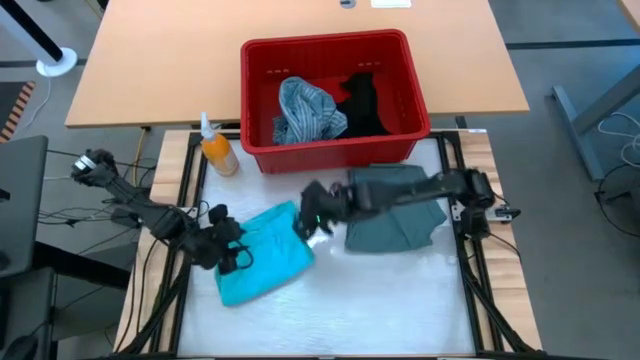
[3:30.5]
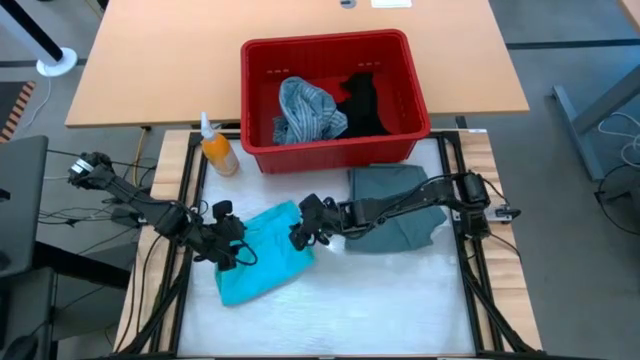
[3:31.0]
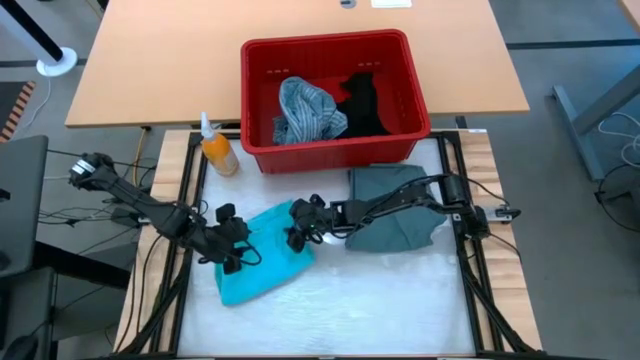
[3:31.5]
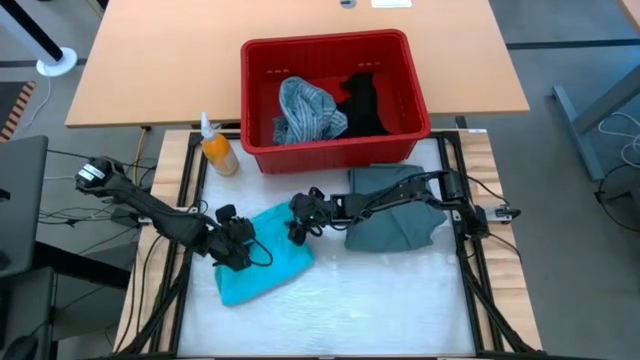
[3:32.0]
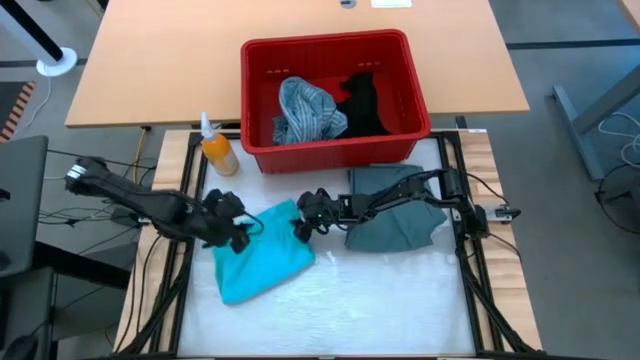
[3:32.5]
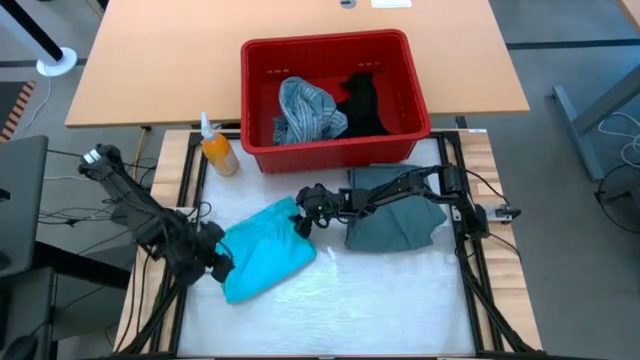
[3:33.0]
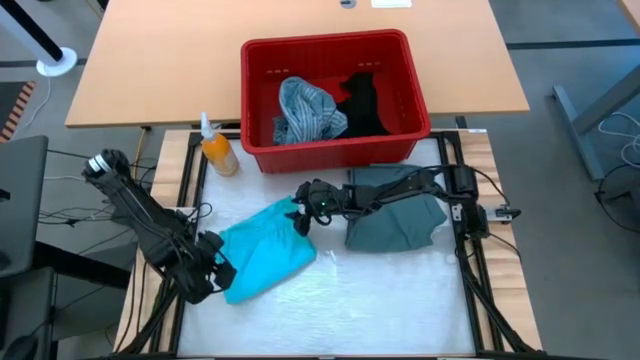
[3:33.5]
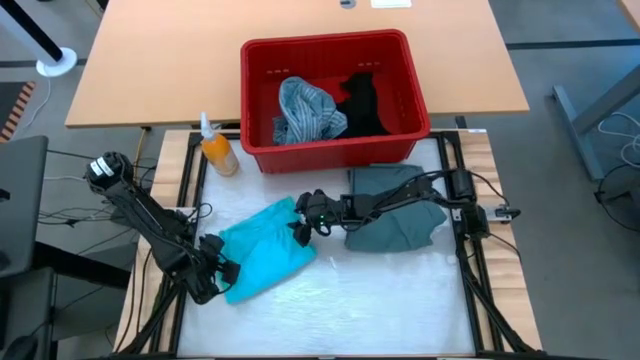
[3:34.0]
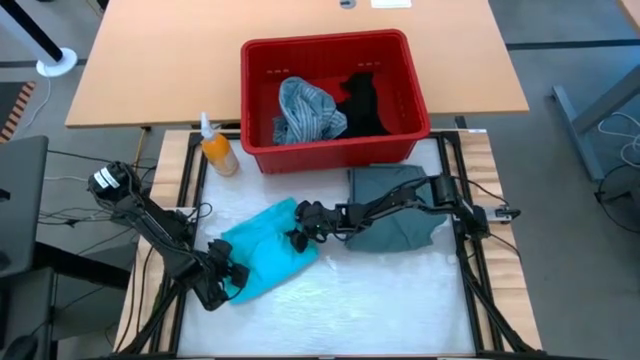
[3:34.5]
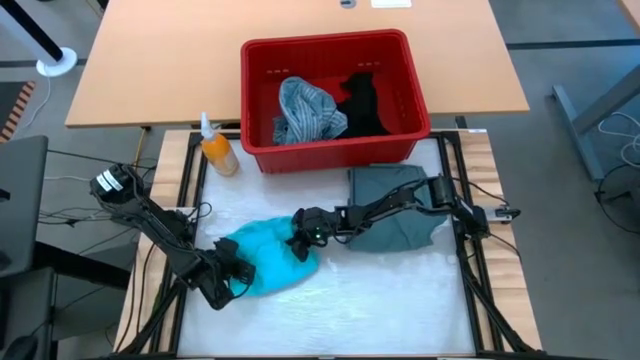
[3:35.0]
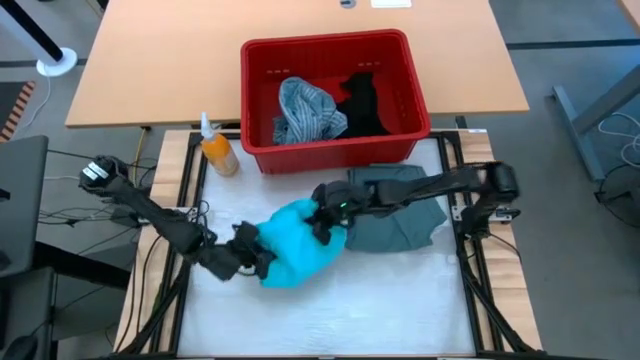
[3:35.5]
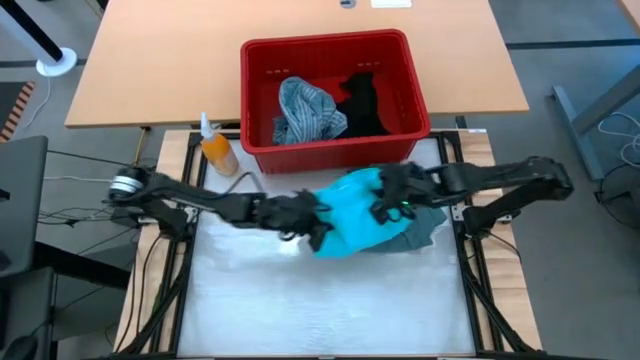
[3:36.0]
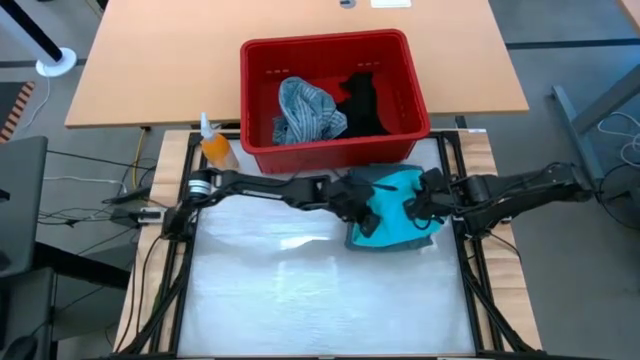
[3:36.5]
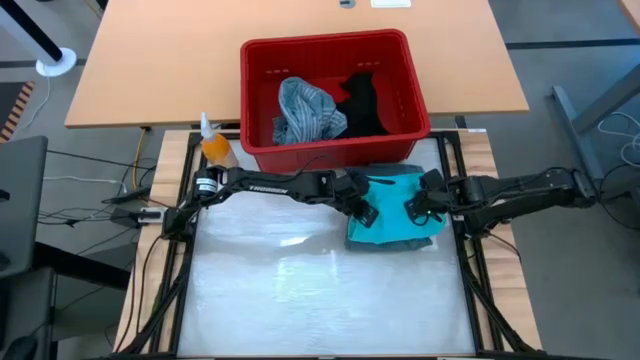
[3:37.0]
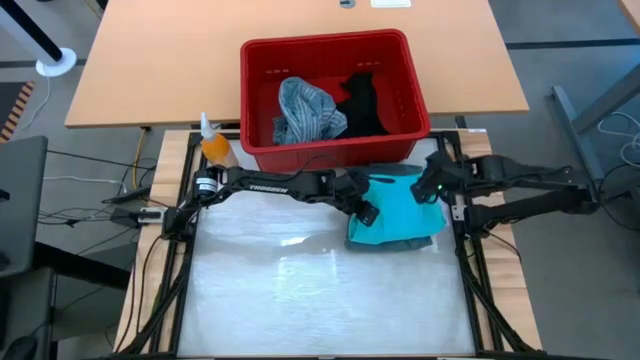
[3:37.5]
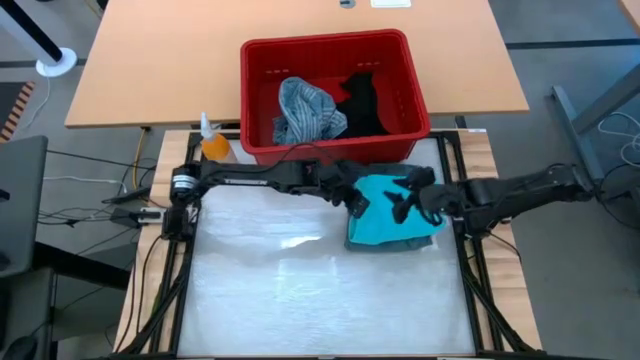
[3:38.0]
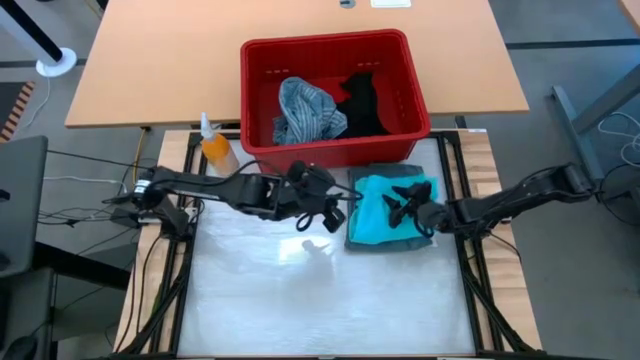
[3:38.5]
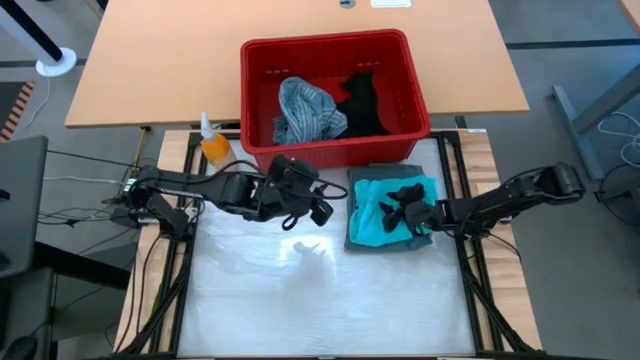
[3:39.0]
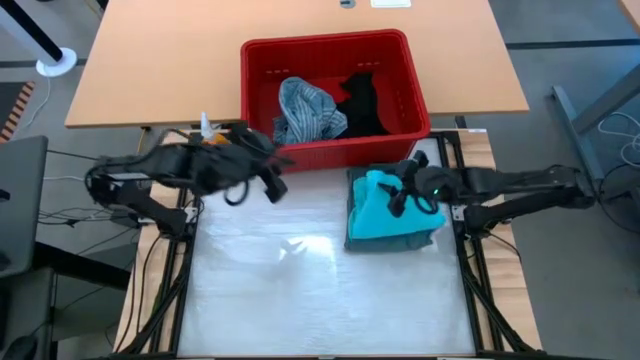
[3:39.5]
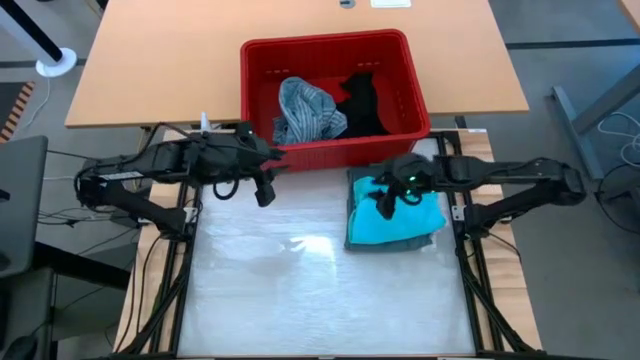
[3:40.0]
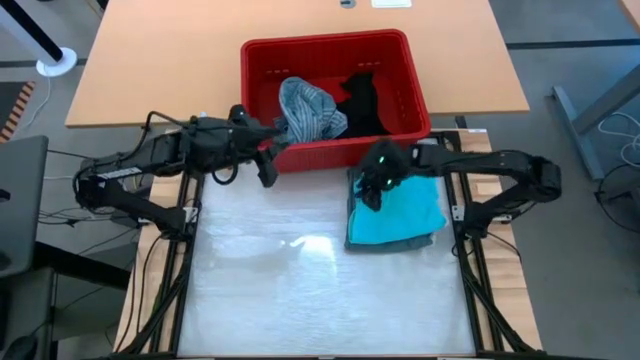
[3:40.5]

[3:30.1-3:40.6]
Task: Fold Laundry from Bin
Stack the folded light blue shorts on the folded dark blue pants

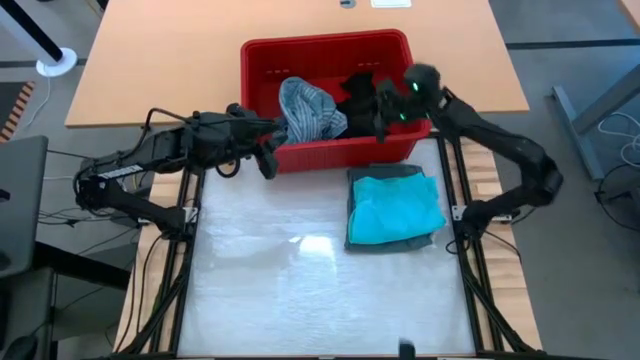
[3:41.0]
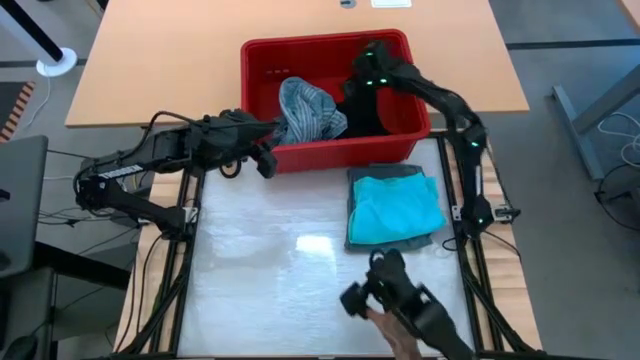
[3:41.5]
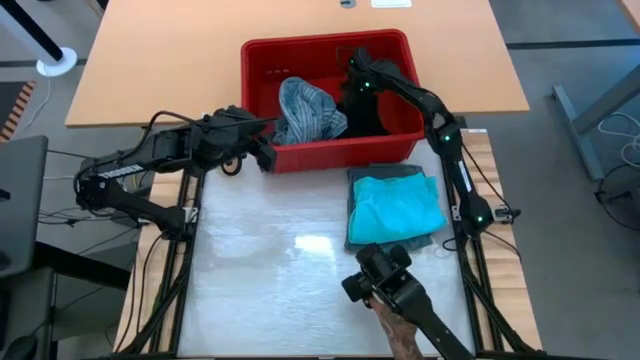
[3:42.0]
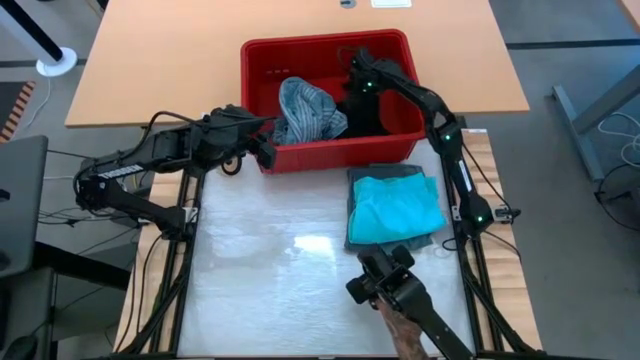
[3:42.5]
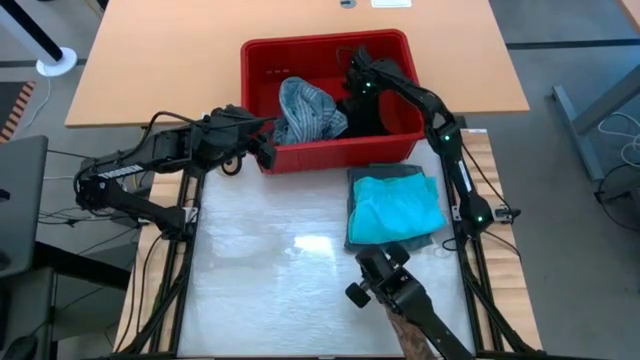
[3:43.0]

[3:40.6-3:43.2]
Remove the blue patterned polo shirt from the red bin

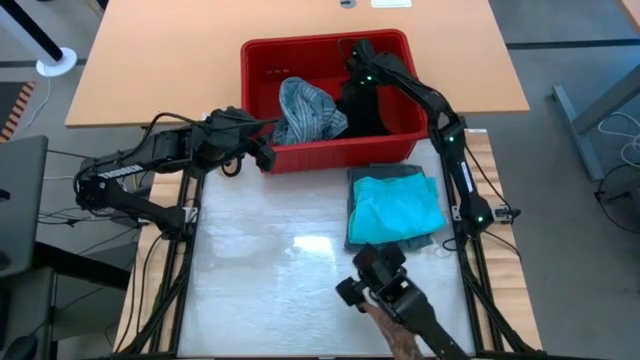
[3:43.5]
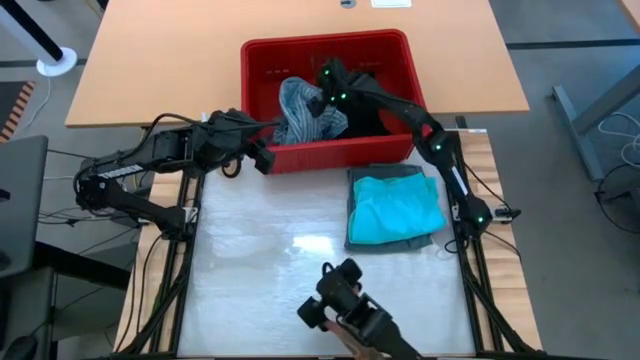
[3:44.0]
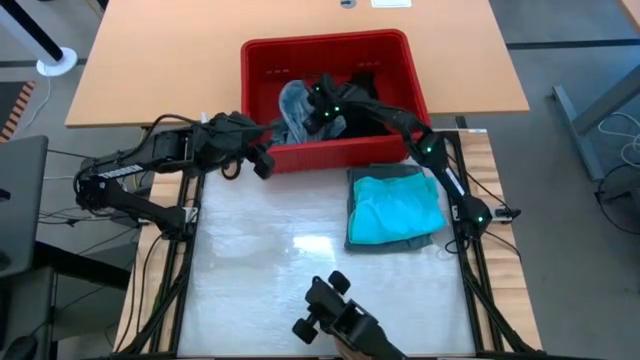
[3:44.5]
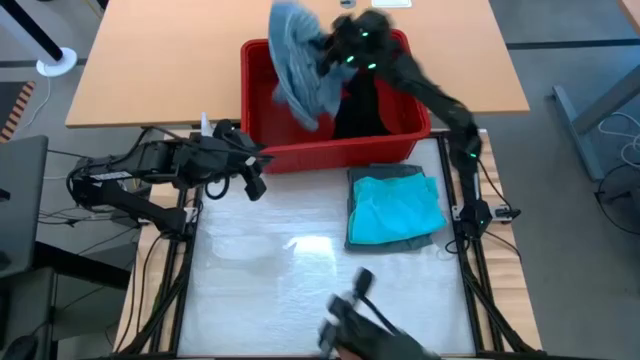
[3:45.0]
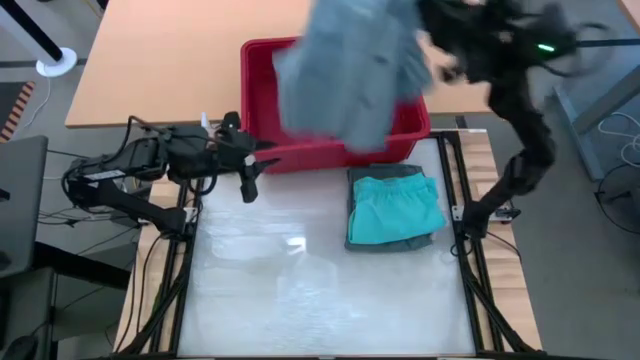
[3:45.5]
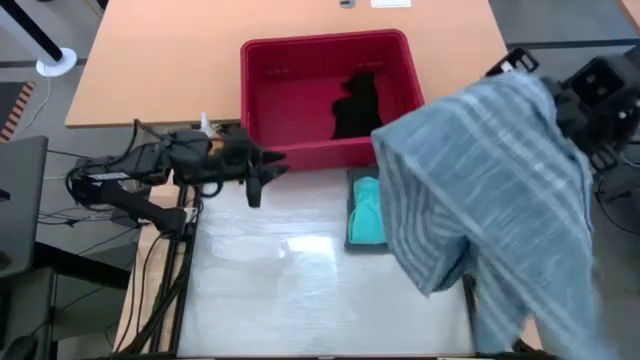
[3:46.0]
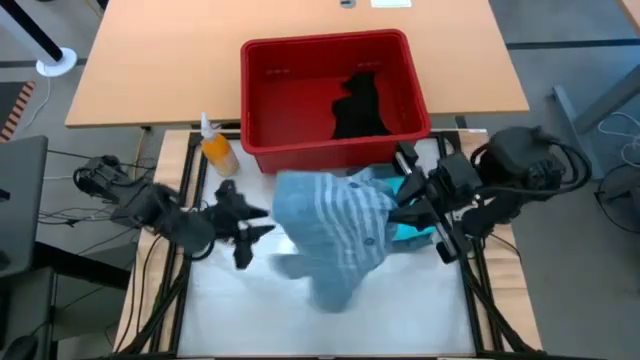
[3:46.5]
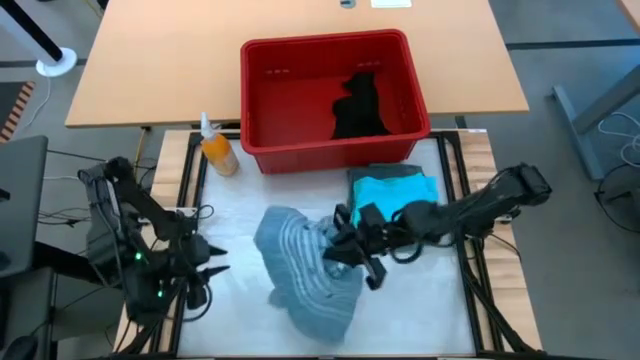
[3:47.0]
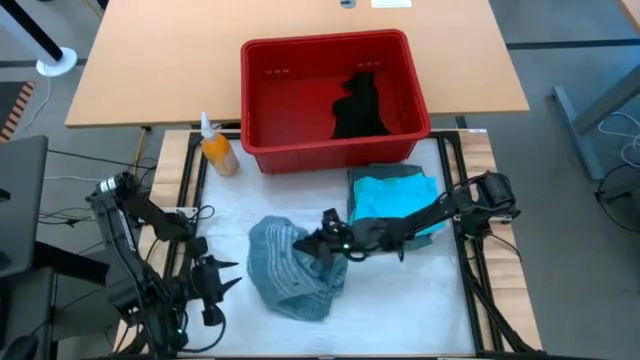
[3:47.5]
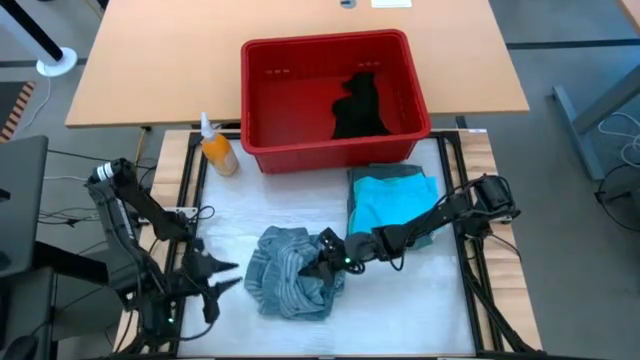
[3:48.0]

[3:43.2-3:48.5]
Remove the blue patterned polo shirt from the red bin

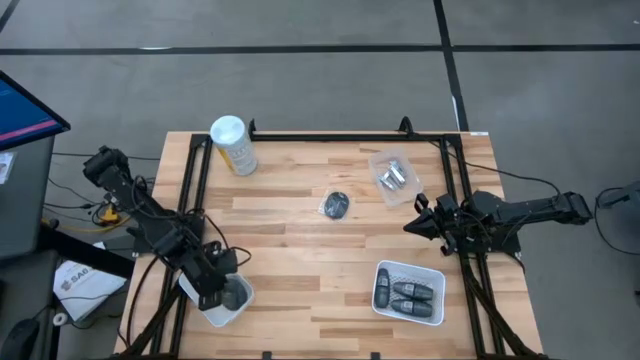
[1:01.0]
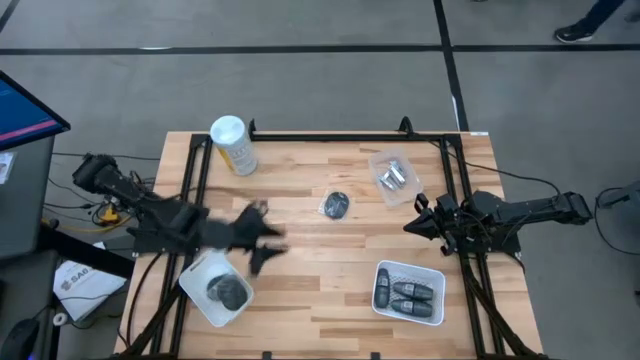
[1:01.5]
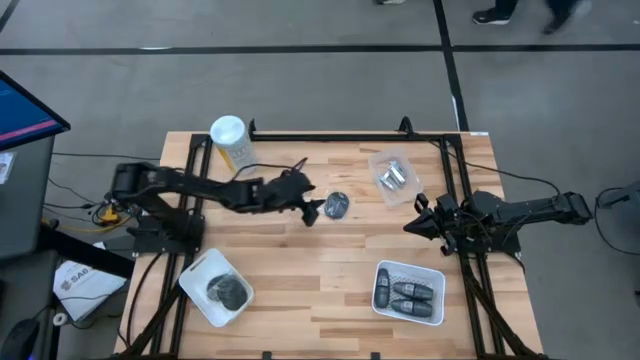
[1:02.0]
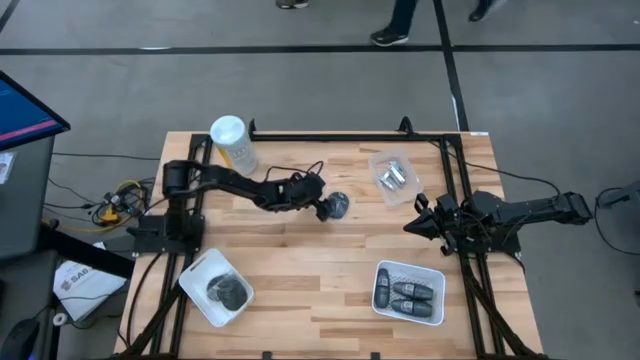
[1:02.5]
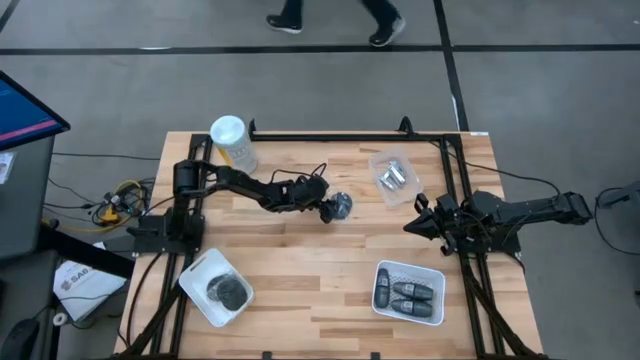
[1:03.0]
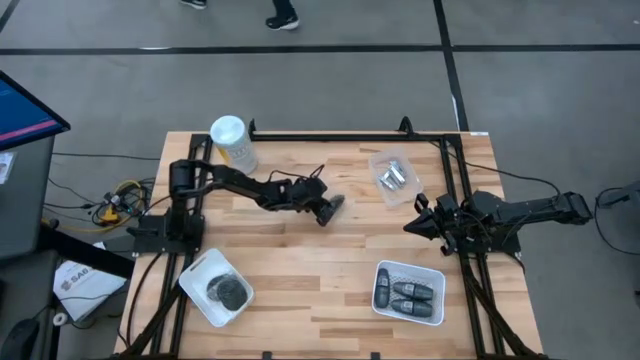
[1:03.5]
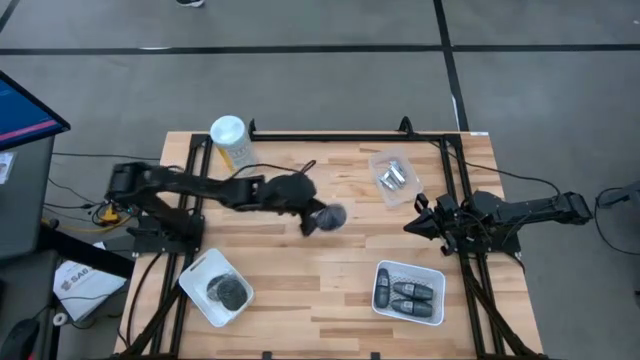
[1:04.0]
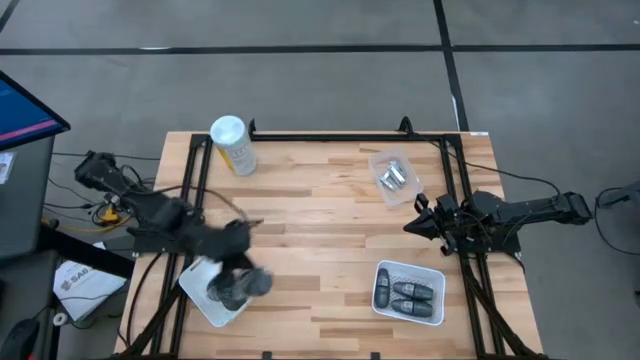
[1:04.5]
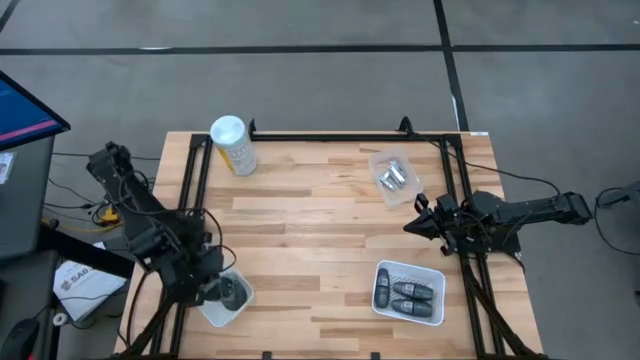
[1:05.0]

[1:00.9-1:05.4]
Task: Pick & Place Travel size toiletries
Put the black hairbrush into the bottom left white bin
